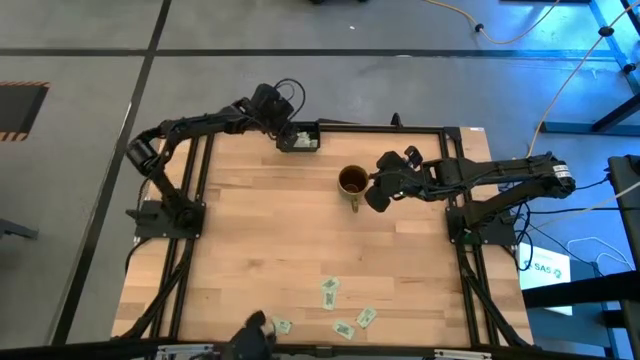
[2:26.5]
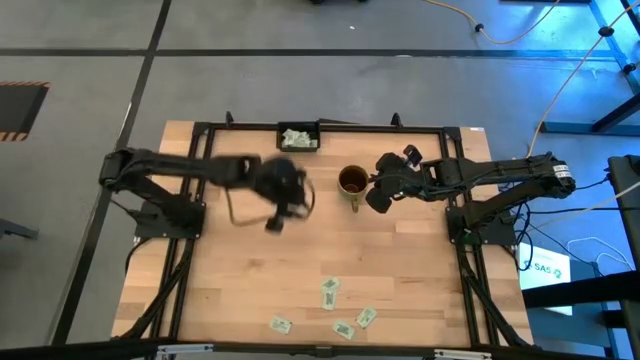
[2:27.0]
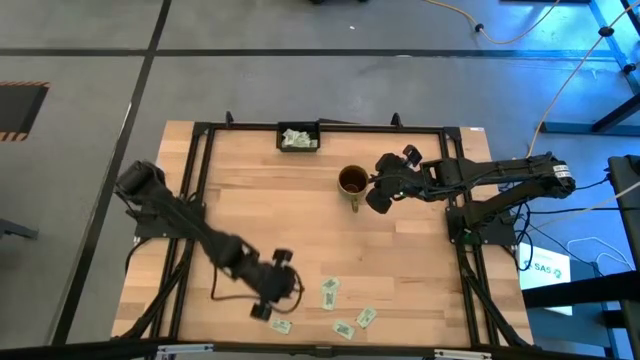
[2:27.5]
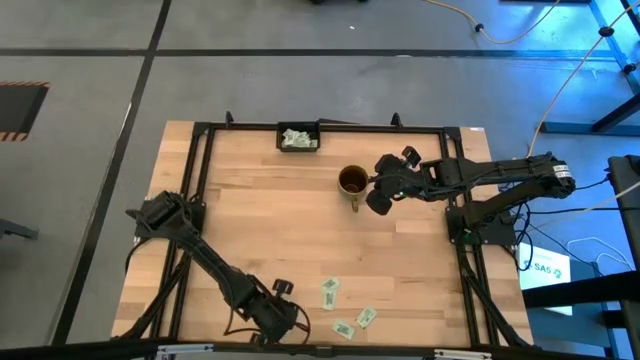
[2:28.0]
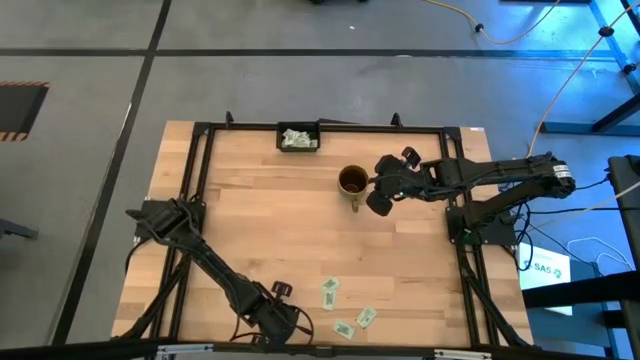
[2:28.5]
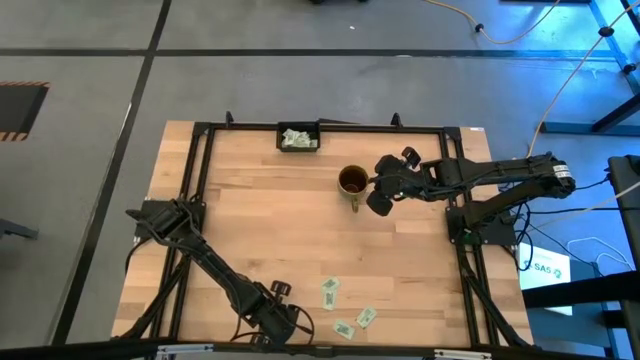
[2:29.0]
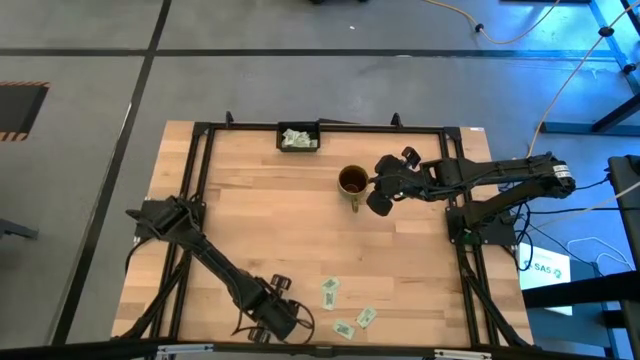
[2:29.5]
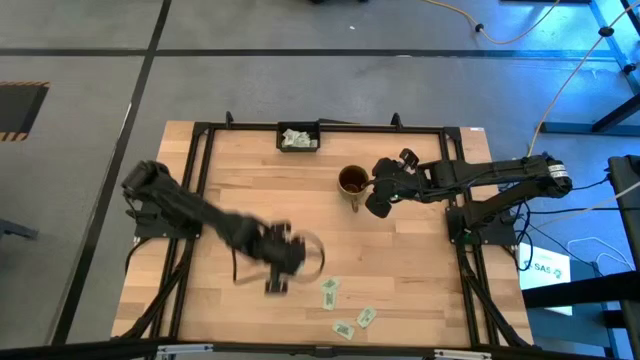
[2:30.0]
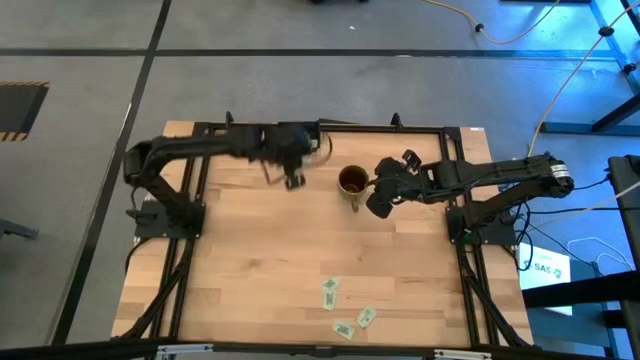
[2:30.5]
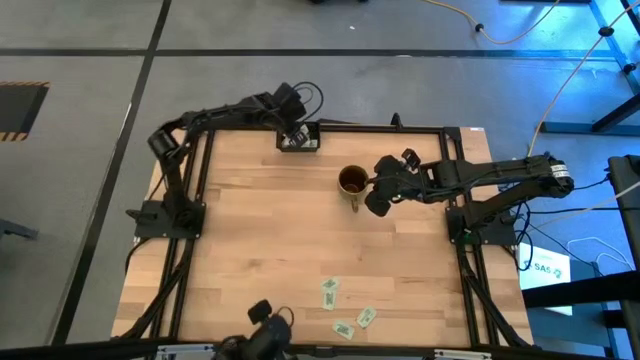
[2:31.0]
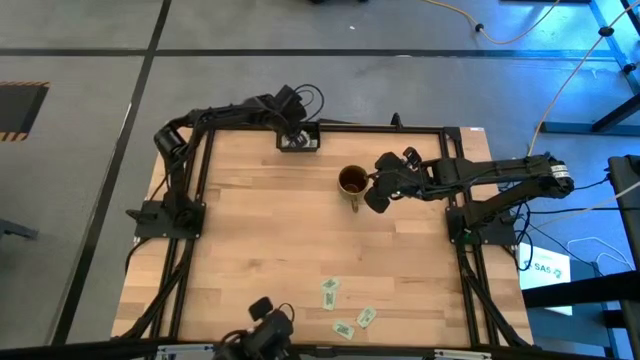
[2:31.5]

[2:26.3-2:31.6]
Task: Pick and place Stevia / Truvia into bins
Put the stevia packet into the black container

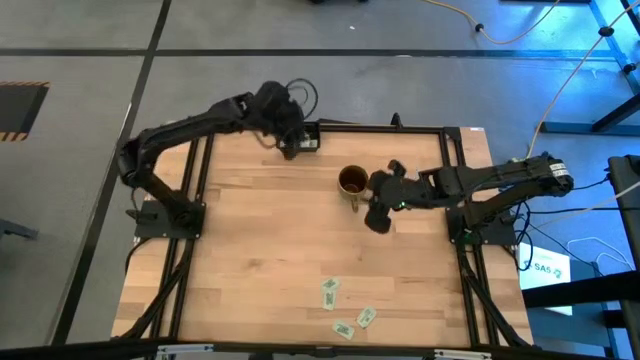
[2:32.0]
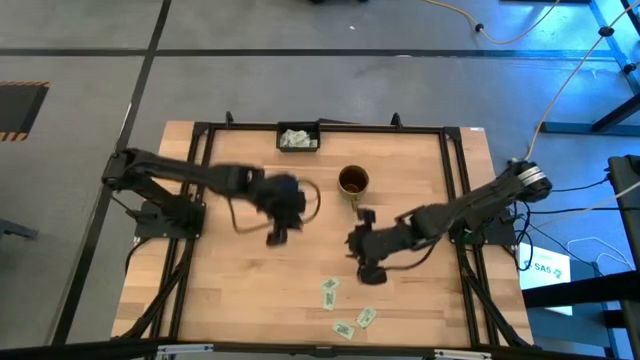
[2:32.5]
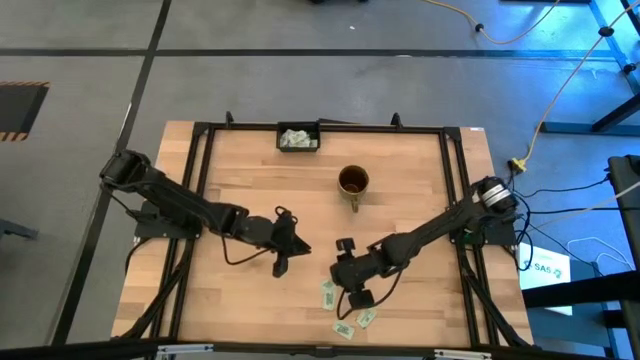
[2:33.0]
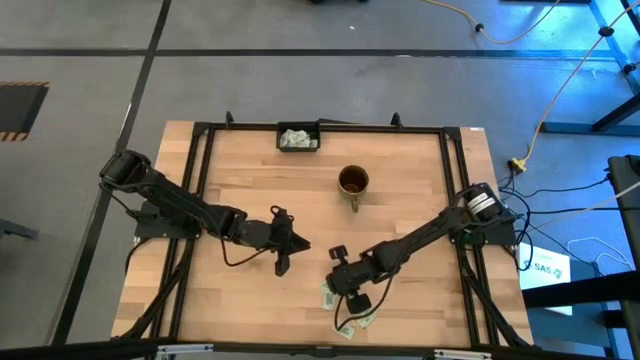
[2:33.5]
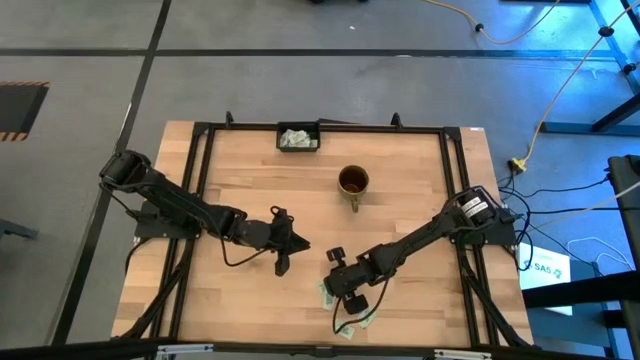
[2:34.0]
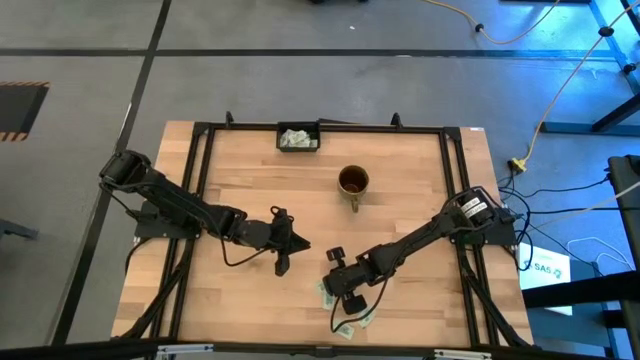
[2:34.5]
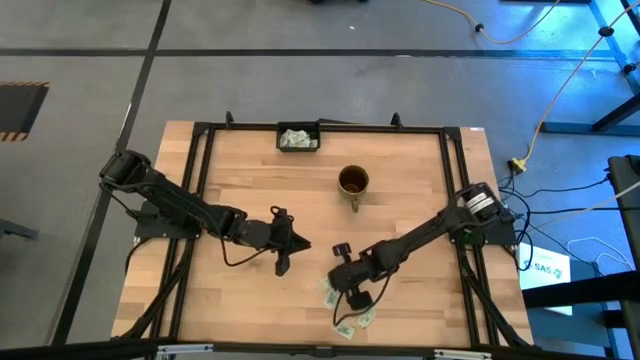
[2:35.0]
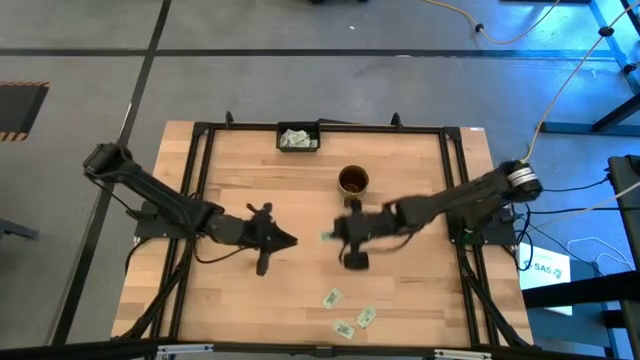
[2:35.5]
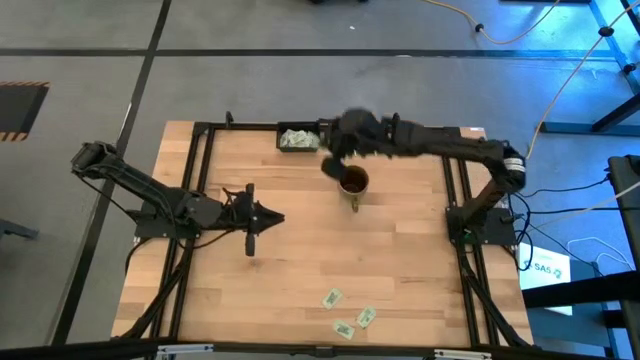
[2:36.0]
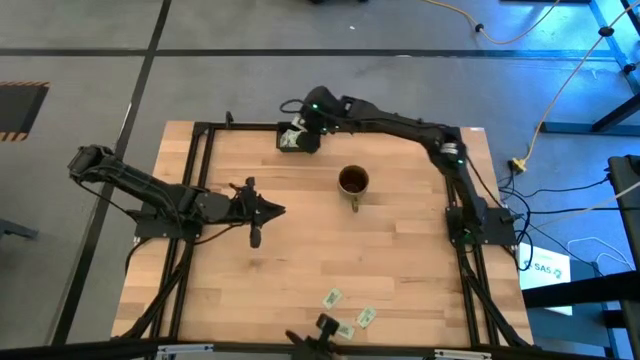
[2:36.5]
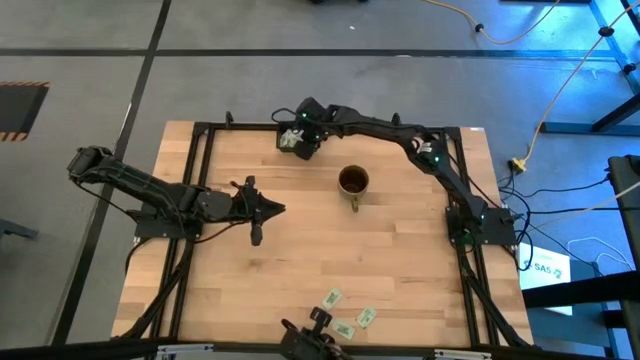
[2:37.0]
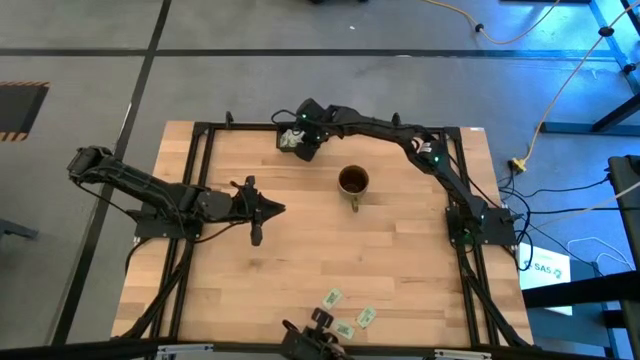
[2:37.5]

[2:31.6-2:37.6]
Put the stevia packet into the black container

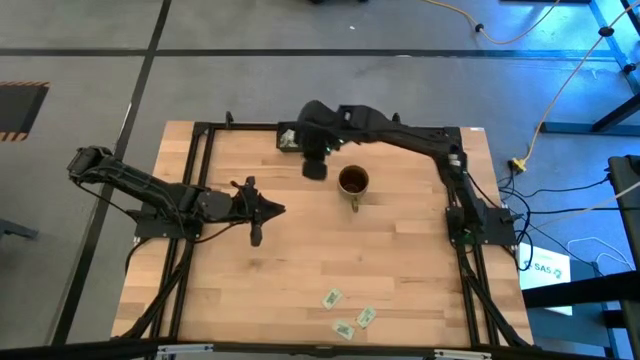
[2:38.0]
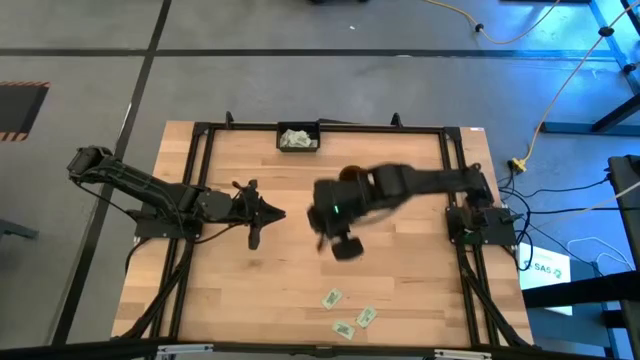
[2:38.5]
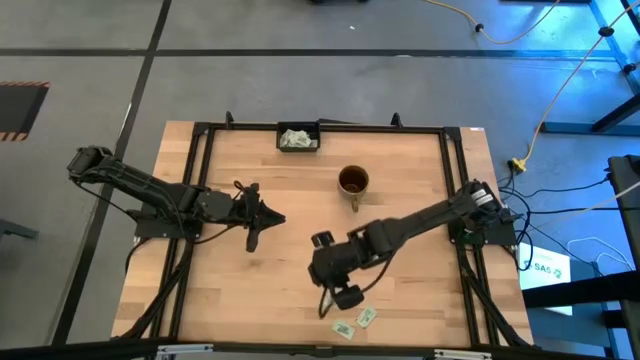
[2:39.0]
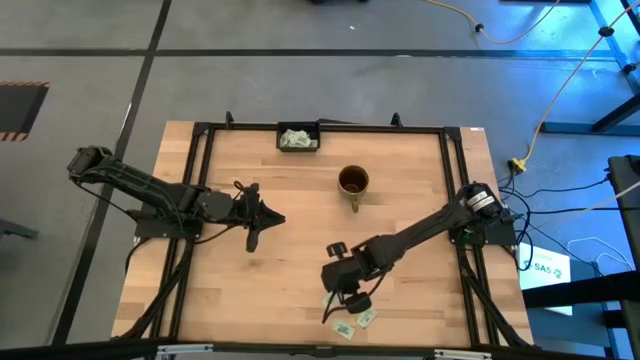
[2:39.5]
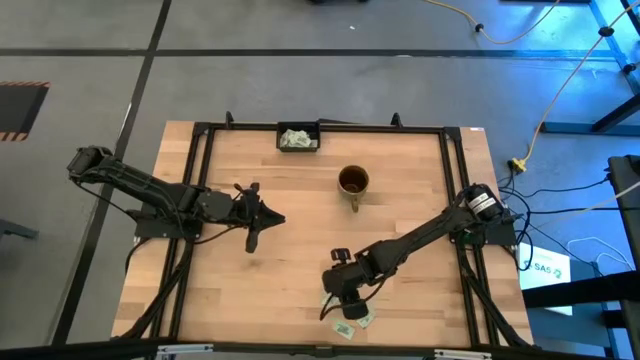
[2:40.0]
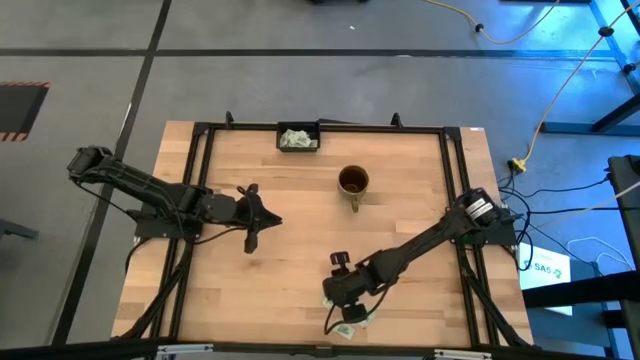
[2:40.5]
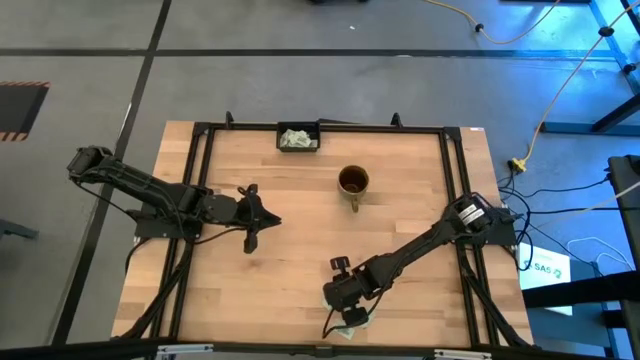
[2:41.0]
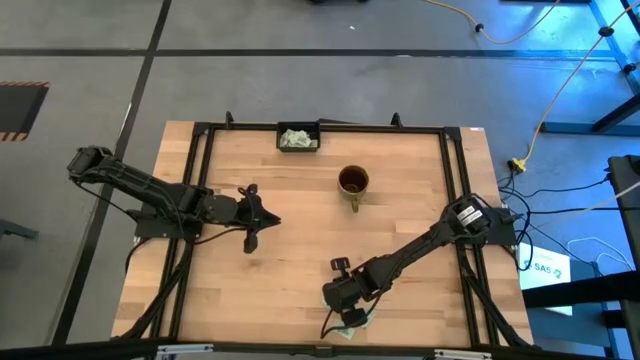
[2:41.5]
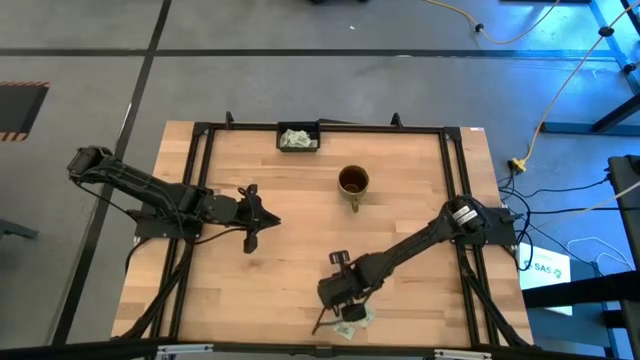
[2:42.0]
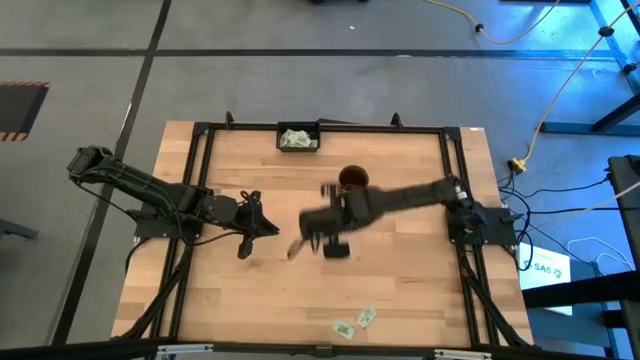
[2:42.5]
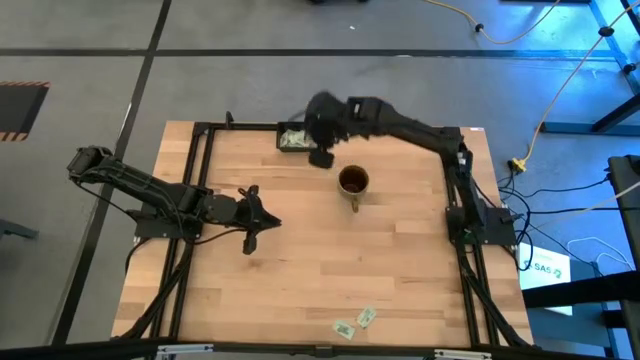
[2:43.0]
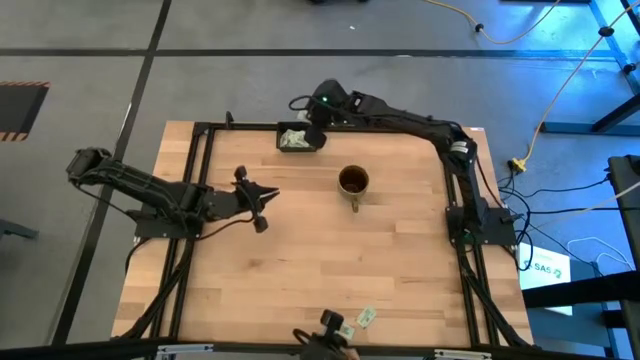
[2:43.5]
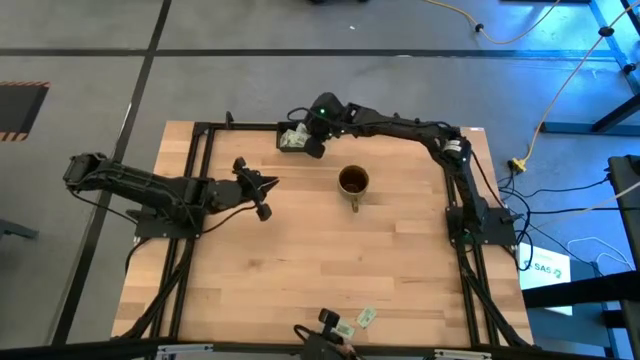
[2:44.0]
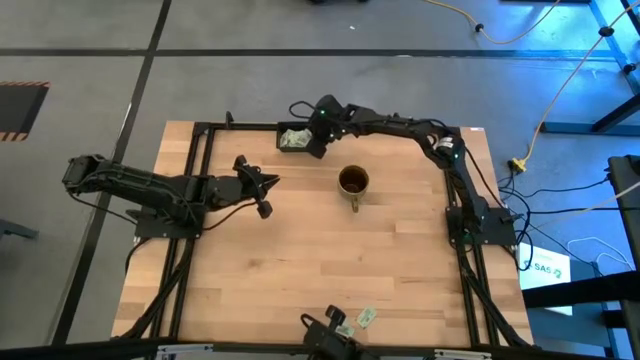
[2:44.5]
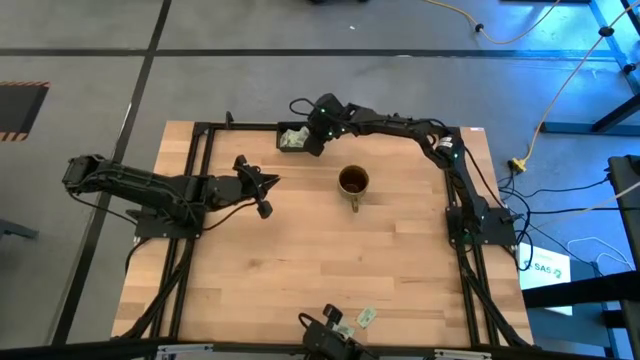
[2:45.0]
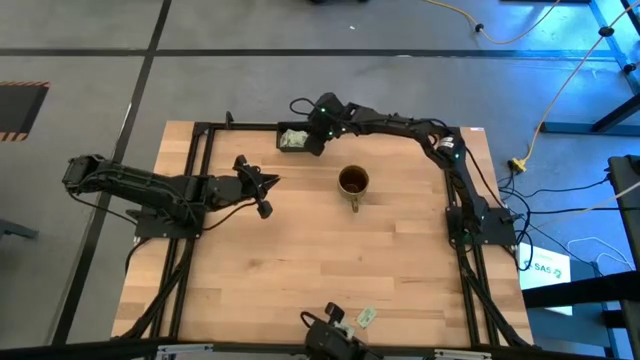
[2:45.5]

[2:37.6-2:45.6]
Put the stevia packet into the black container

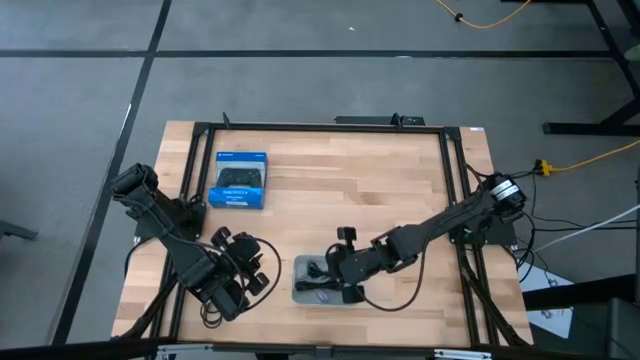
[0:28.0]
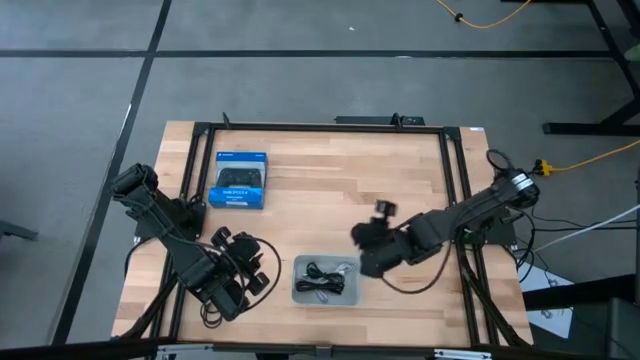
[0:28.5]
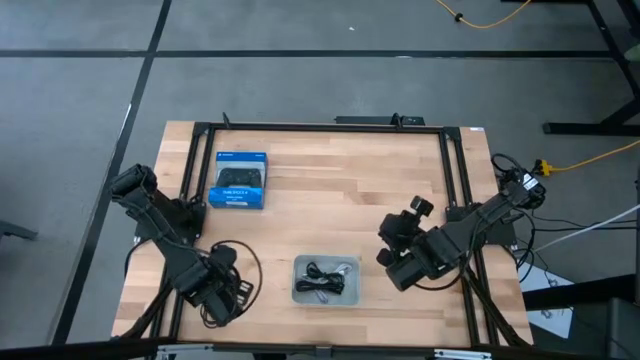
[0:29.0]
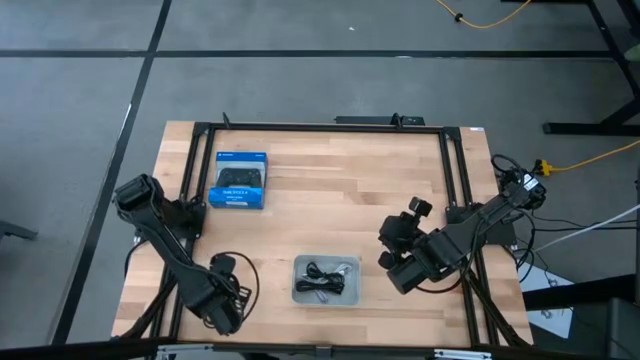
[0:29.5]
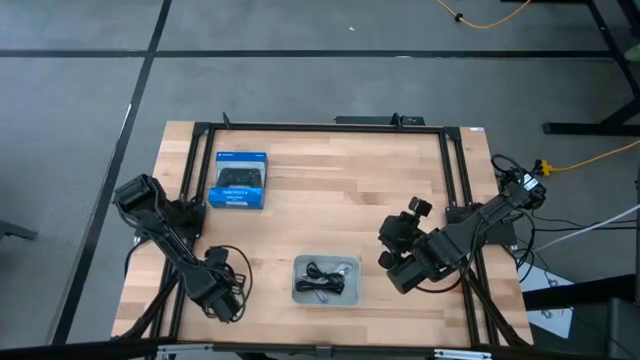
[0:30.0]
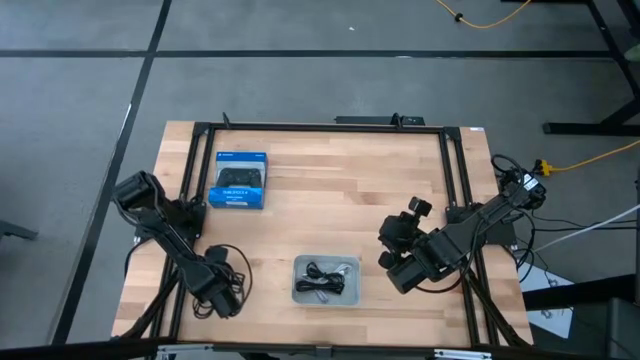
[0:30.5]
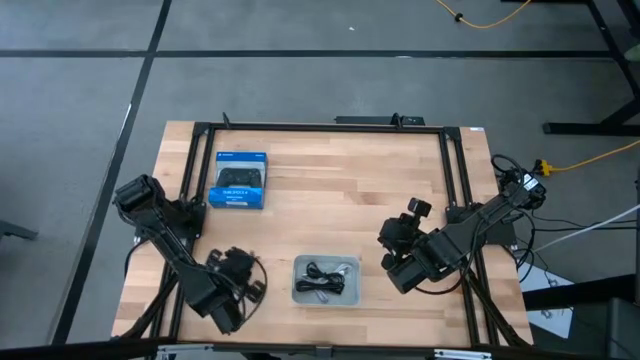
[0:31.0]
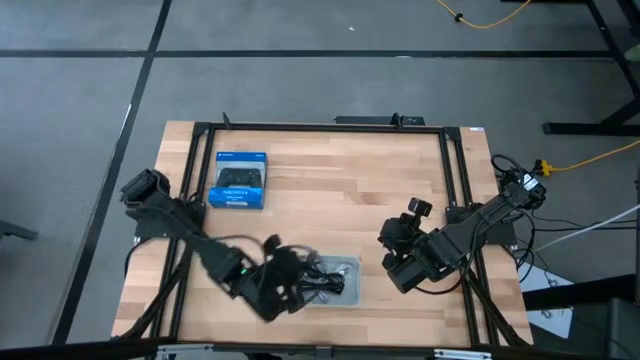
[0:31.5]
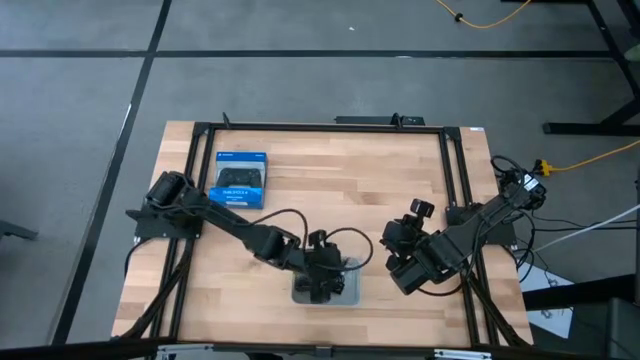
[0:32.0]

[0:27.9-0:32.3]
Task: Pick and place USB-C Cables
Put the black white charger cable into the gray bin
